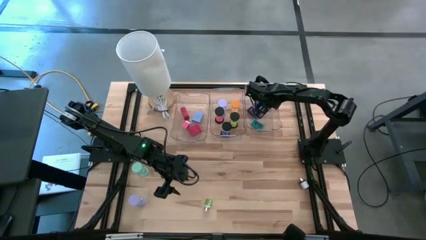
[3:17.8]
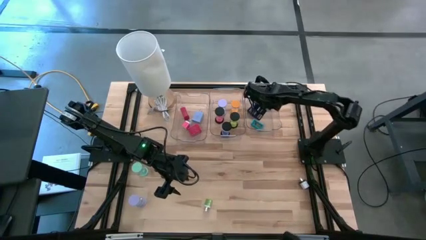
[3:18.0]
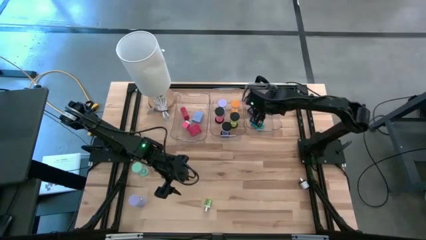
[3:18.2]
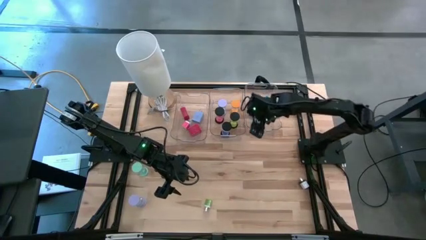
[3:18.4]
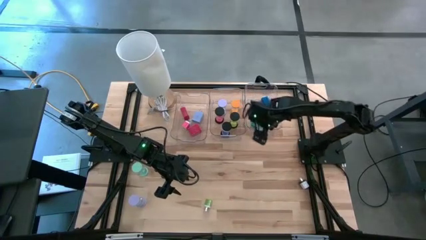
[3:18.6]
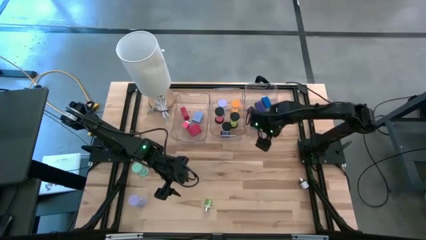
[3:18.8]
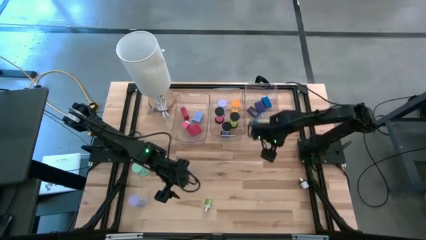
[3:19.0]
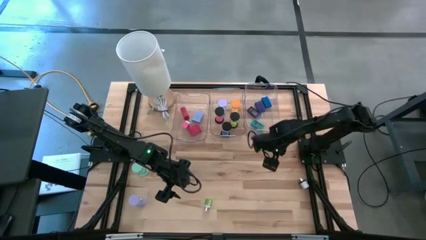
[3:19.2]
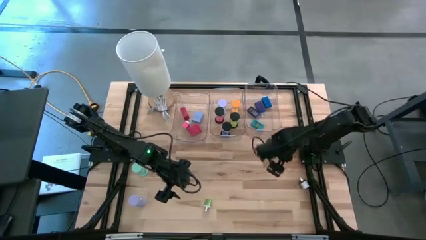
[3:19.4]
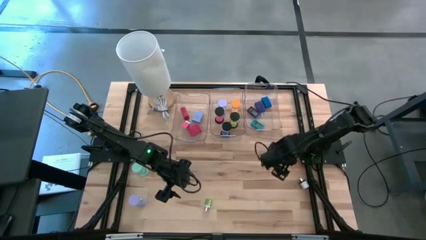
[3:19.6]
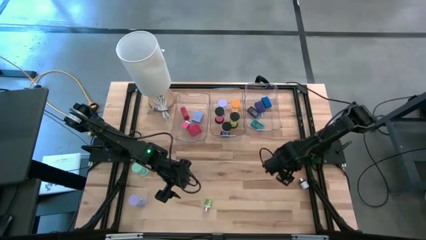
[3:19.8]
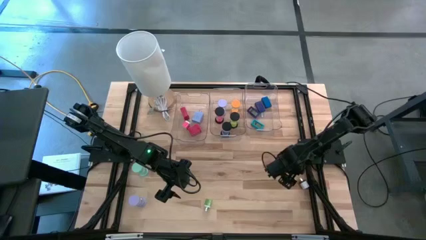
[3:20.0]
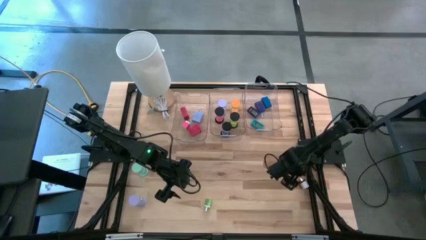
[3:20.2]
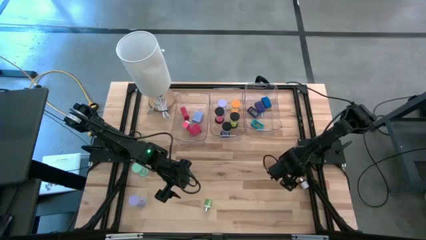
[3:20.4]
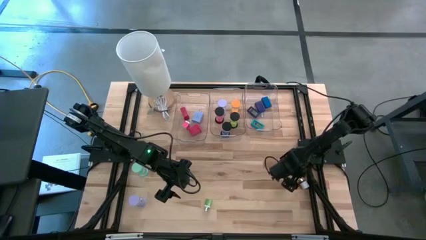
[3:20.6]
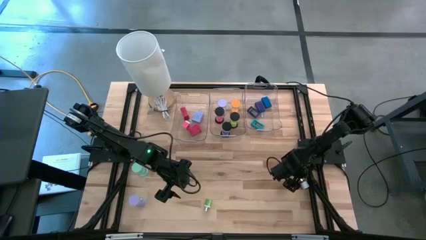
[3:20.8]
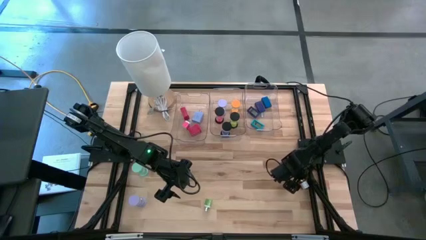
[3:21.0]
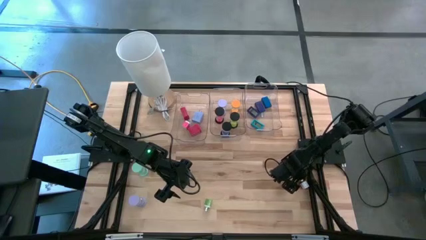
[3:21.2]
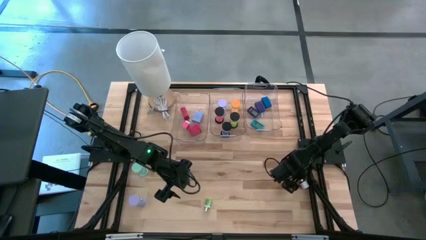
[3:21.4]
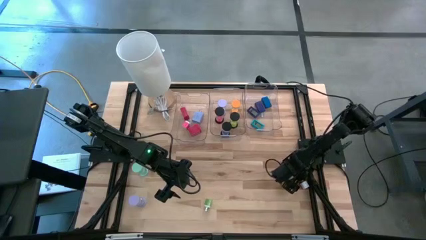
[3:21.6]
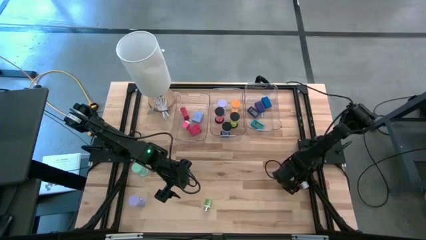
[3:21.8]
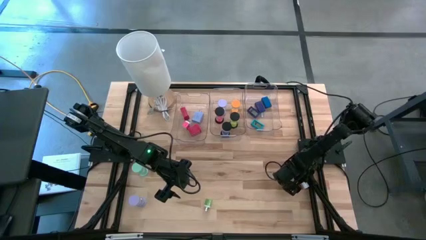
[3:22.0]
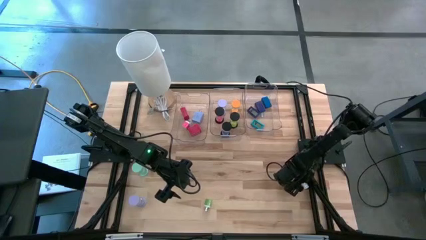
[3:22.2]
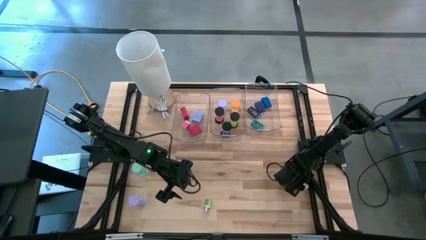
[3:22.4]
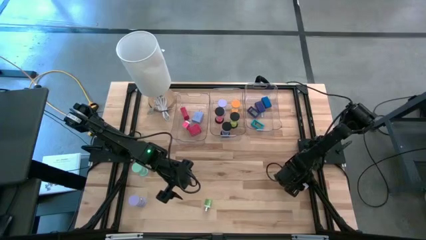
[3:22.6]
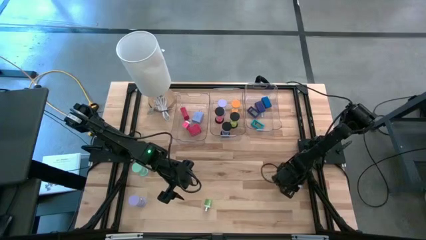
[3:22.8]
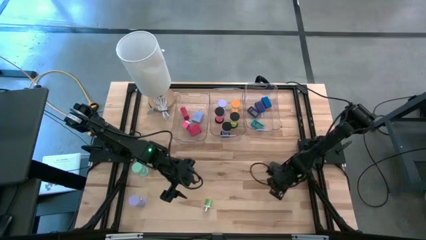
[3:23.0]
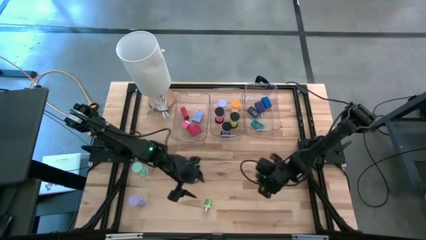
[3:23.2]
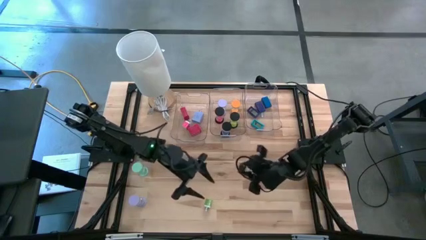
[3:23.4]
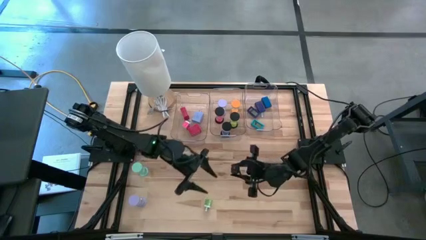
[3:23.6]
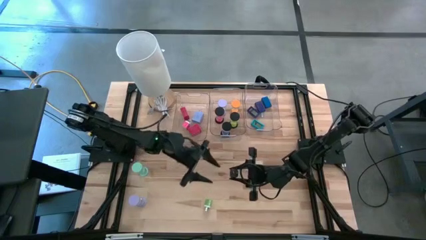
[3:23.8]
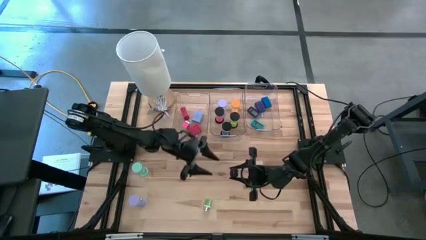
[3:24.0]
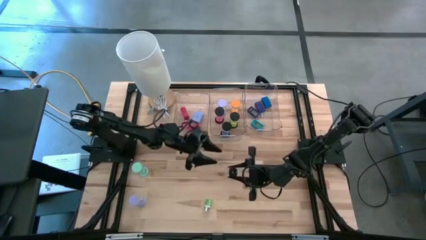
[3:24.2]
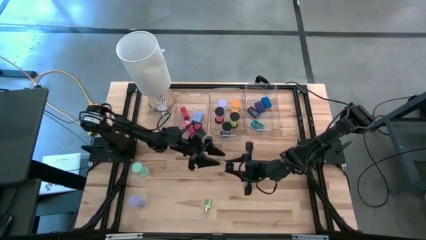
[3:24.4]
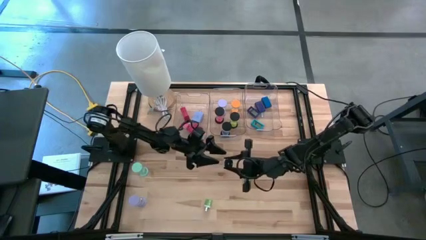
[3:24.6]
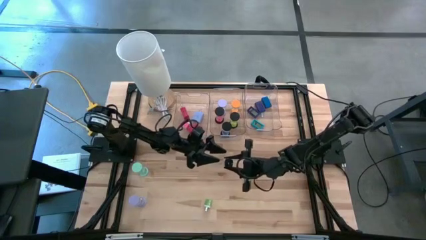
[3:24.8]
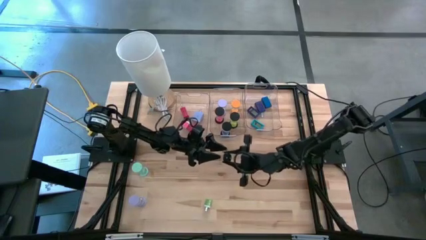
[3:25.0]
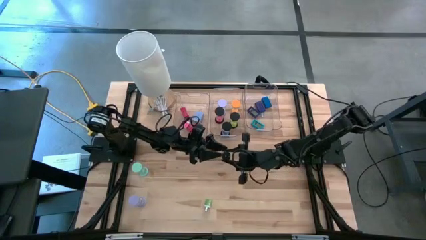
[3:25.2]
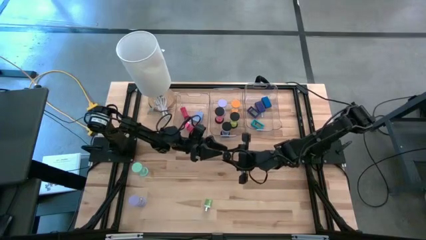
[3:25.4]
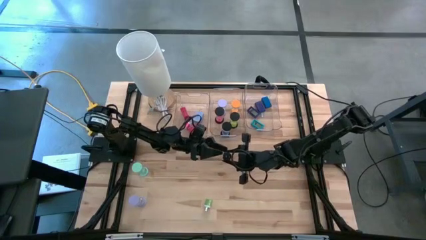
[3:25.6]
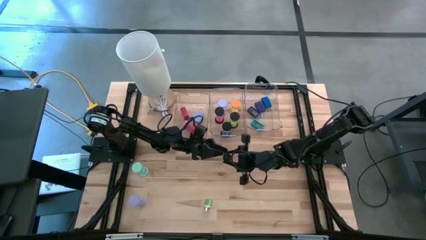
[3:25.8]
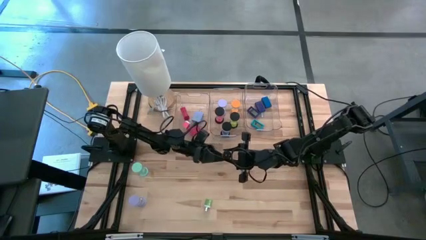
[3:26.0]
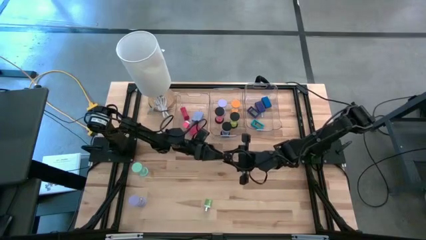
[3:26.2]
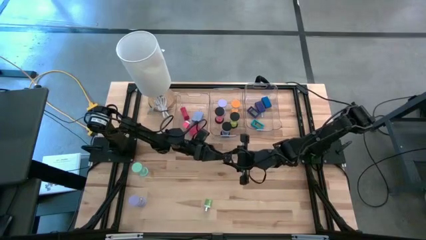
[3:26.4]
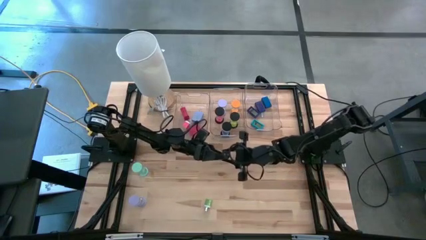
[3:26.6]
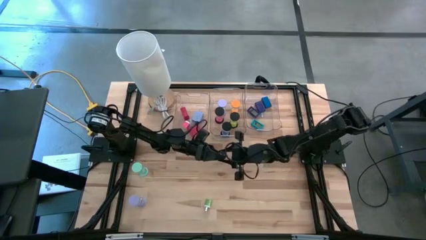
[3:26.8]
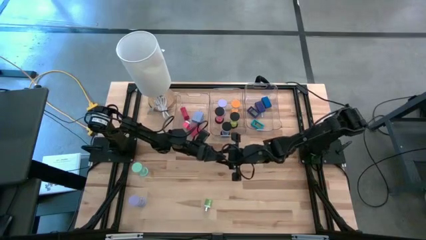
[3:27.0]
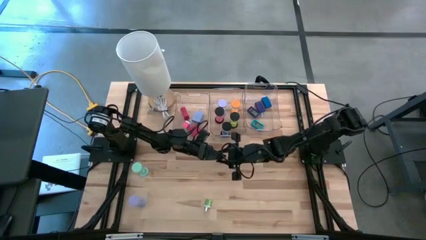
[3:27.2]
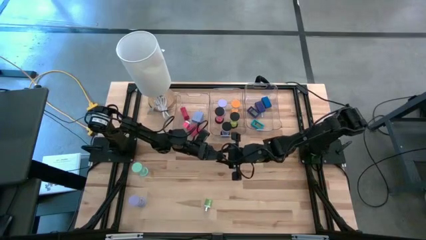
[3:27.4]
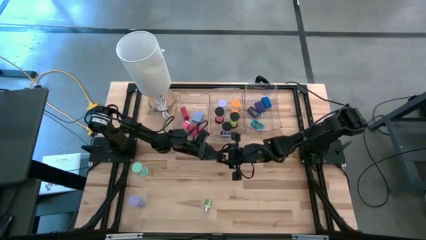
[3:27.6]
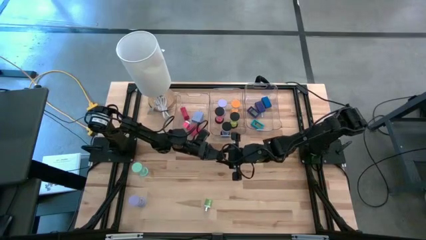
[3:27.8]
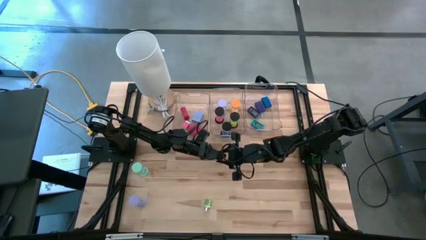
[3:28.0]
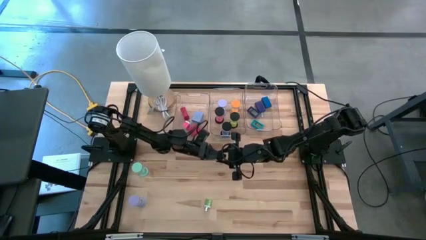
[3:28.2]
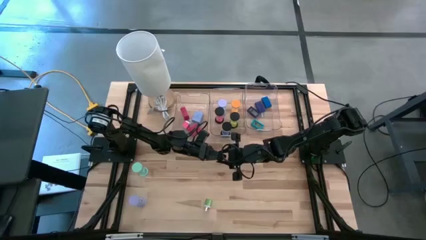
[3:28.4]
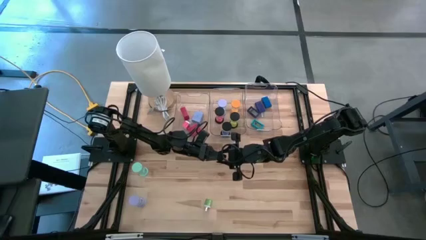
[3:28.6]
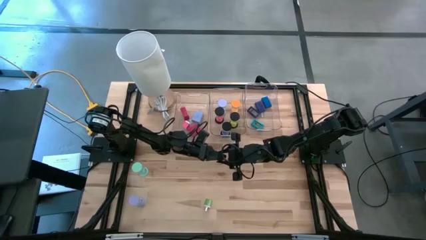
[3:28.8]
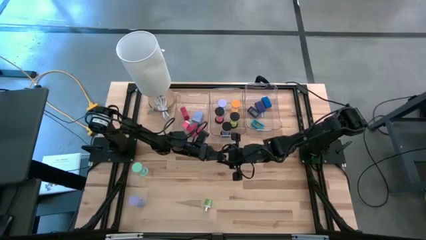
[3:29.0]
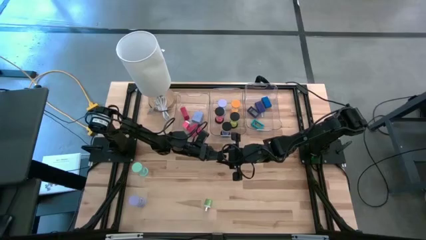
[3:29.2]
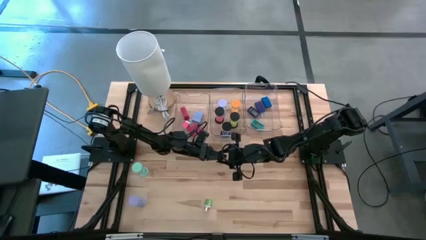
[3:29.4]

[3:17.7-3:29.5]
Task: Pick & Place Office items
Put the white charger adapter into the left transparent bin
